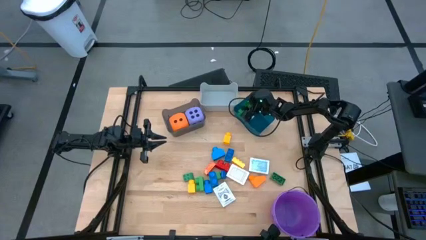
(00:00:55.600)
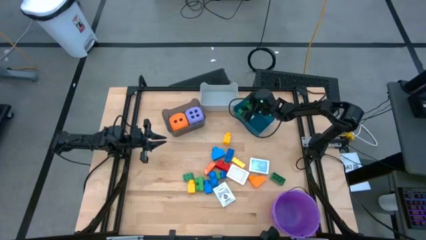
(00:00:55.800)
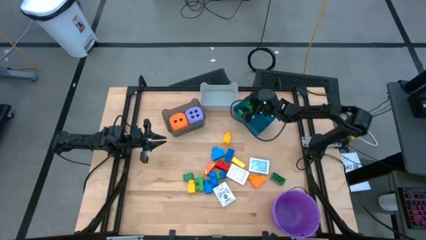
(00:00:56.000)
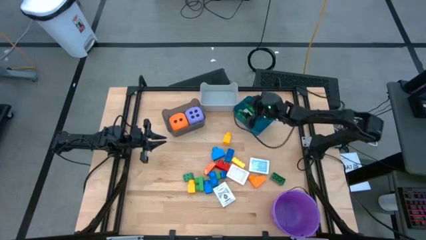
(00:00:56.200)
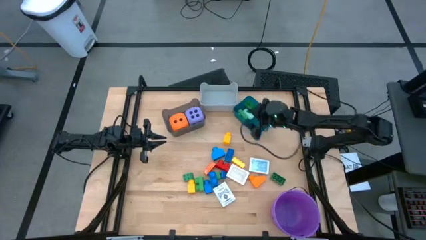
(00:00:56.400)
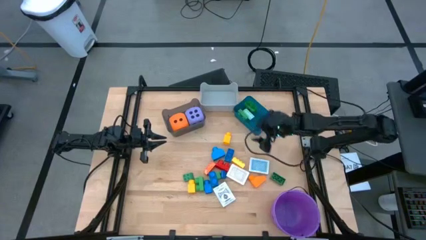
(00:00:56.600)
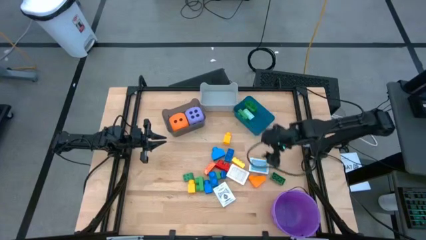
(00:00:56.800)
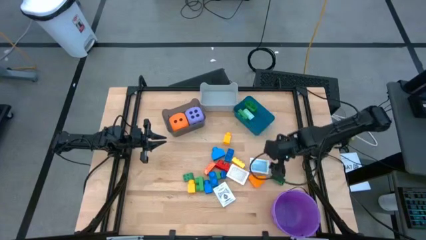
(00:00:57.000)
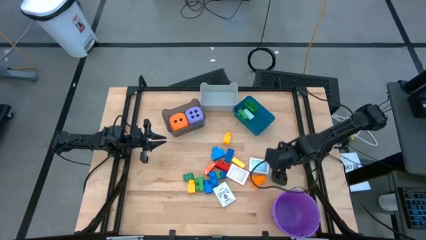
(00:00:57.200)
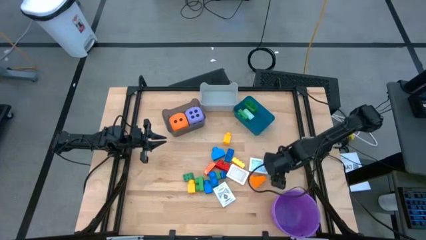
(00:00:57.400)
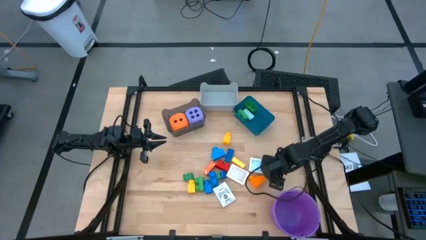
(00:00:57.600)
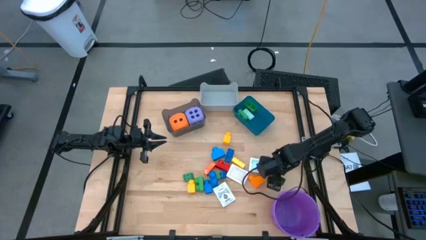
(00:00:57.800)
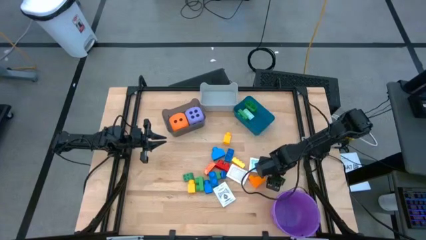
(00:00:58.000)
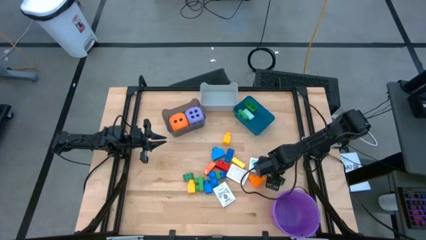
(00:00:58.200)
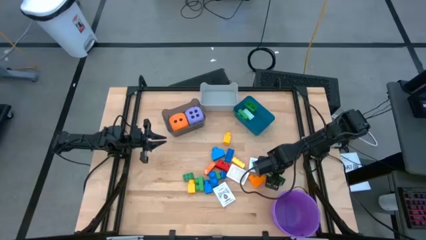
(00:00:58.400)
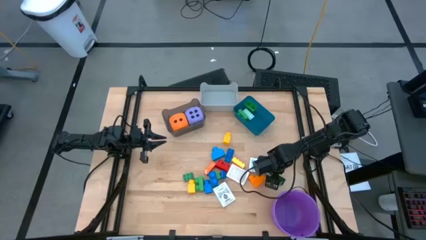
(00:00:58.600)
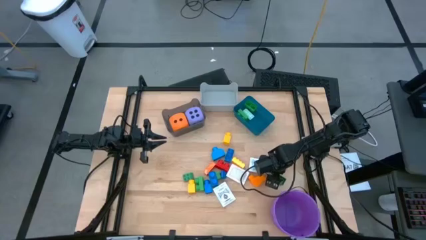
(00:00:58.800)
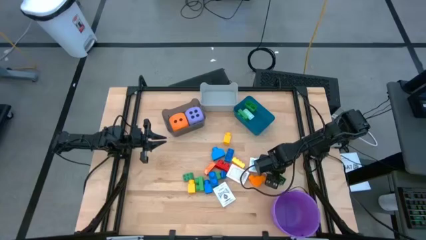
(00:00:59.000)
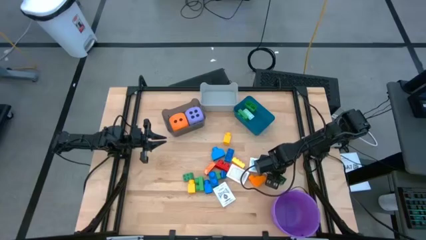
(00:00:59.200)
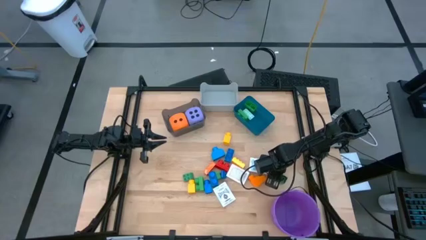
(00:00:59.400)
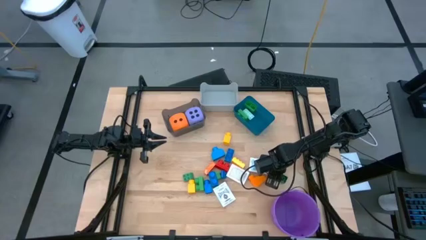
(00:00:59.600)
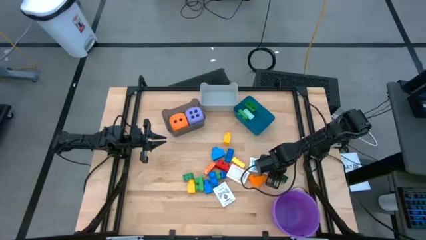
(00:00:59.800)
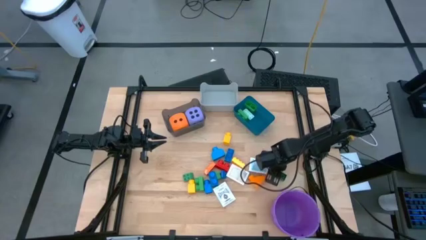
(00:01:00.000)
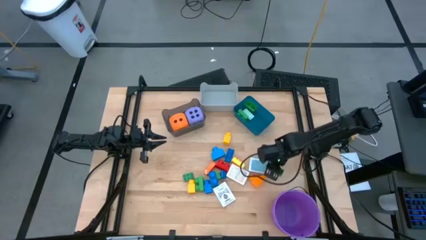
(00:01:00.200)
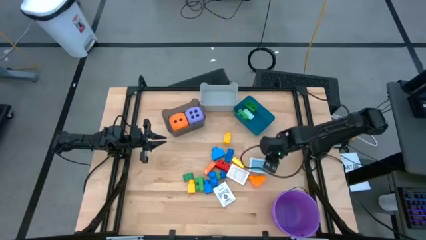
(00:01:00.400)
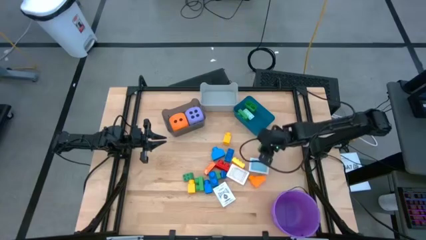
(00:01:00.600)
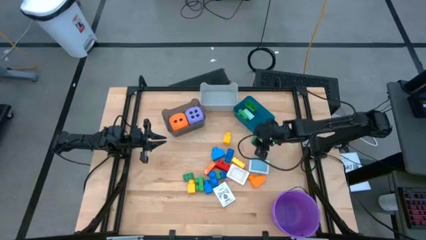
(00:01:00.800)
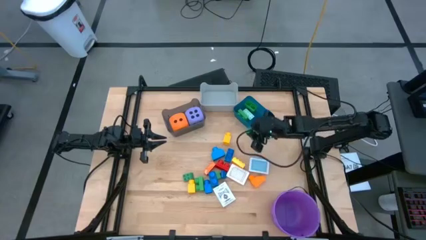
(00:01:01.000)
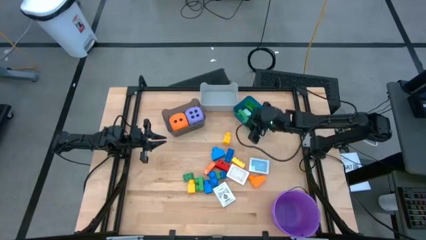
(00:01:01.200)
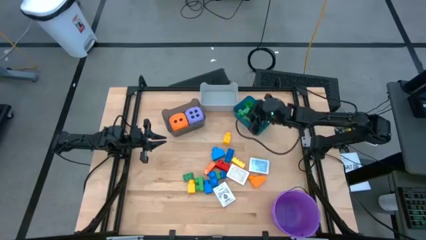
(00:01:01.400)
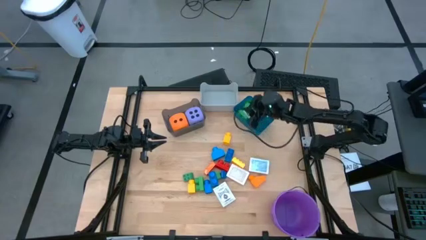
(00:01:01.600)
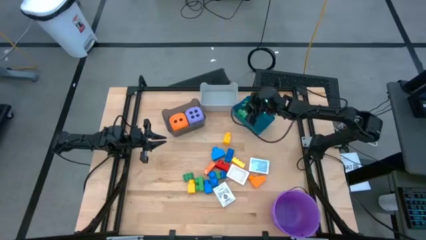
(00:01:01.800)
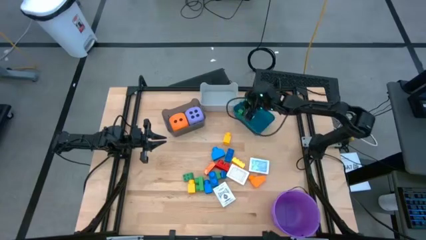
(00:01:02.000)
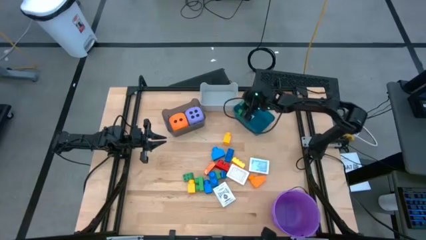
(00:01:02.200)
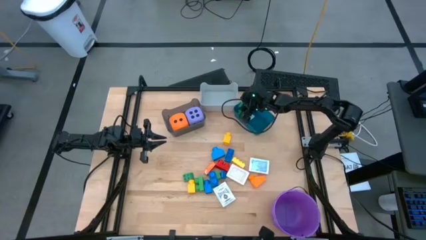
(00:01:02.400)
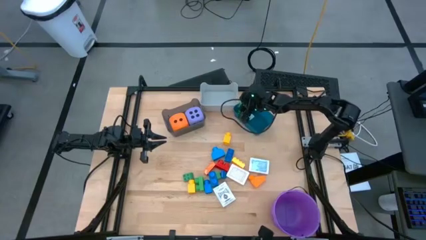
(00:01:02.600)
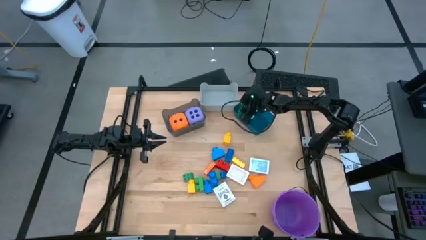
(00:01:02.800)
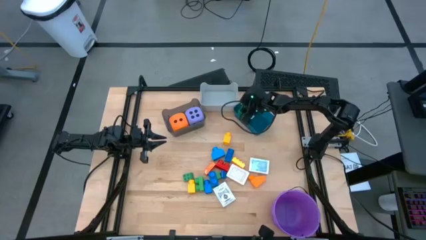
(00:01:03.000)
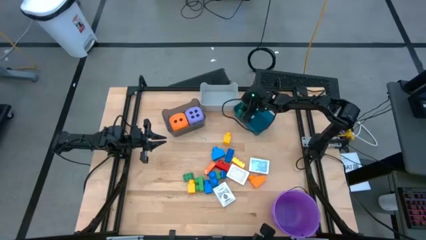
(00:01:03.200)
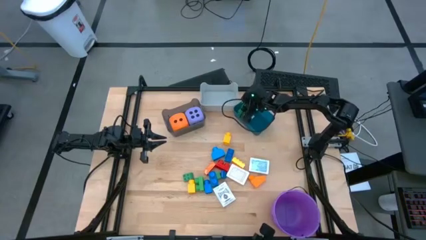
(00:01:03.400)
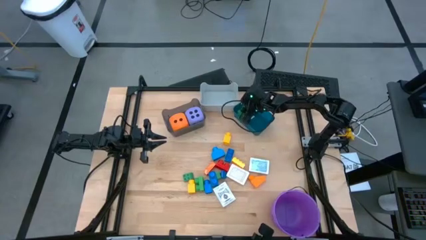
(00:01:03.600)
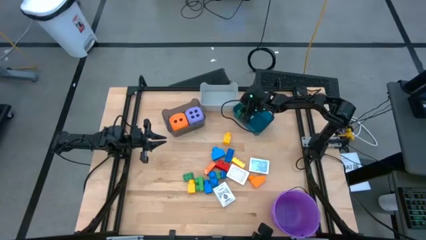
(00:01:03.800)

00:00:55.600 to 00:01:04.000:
Task: Pick & Place Toys
Put the green 8 studs game piece into the blue bin

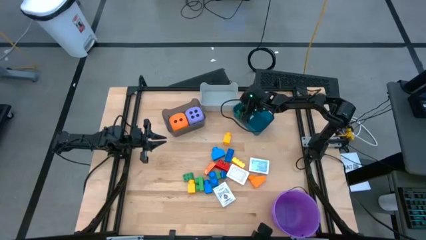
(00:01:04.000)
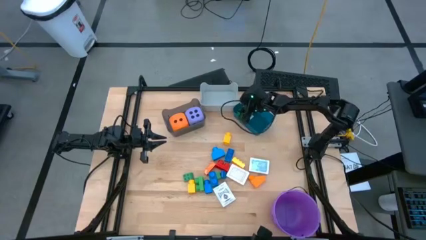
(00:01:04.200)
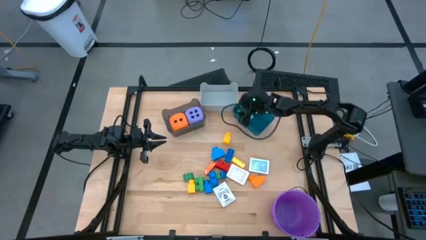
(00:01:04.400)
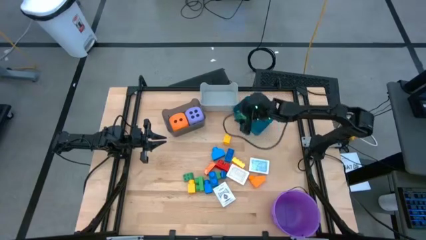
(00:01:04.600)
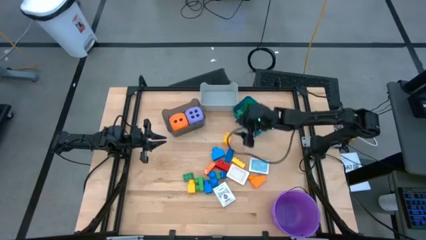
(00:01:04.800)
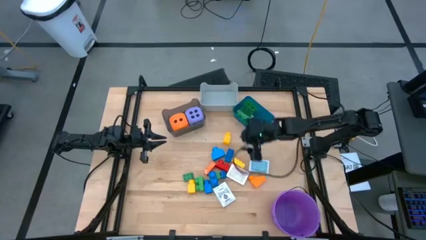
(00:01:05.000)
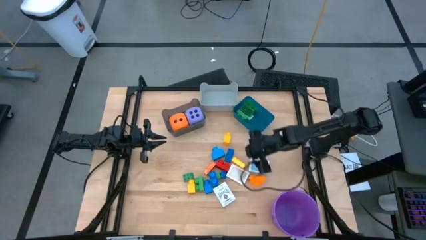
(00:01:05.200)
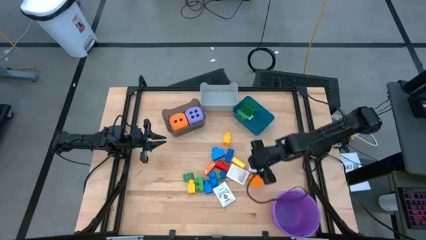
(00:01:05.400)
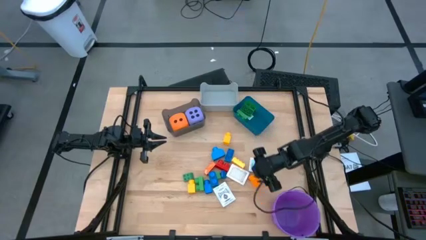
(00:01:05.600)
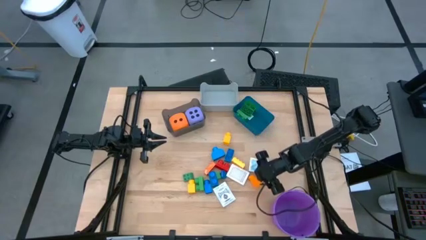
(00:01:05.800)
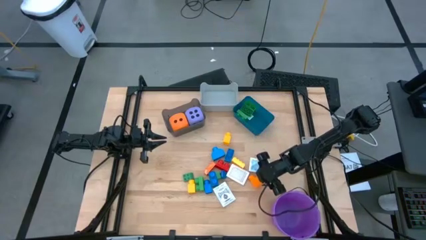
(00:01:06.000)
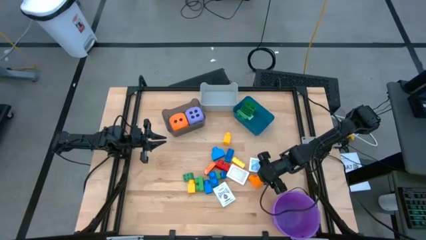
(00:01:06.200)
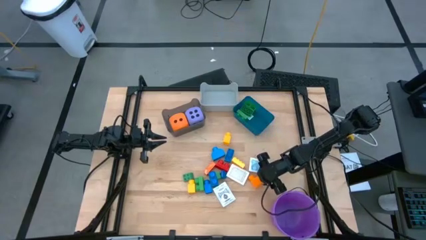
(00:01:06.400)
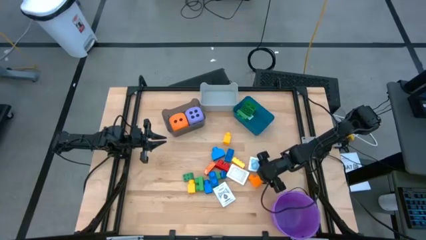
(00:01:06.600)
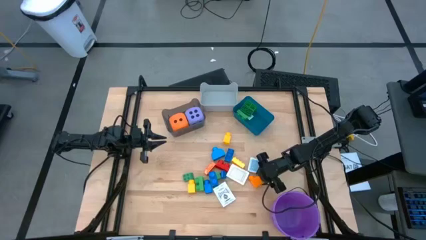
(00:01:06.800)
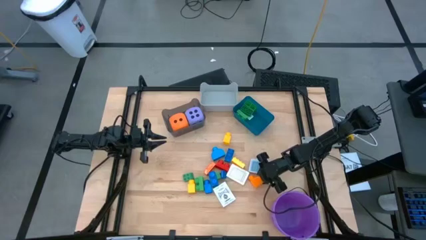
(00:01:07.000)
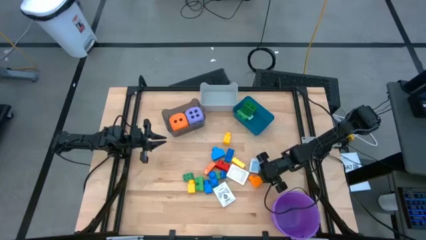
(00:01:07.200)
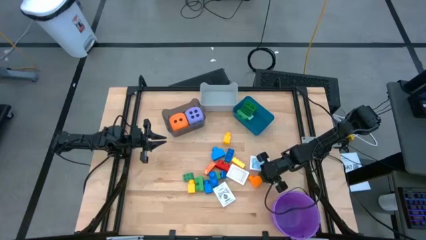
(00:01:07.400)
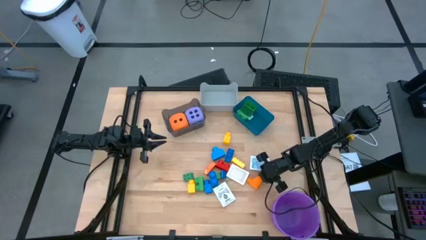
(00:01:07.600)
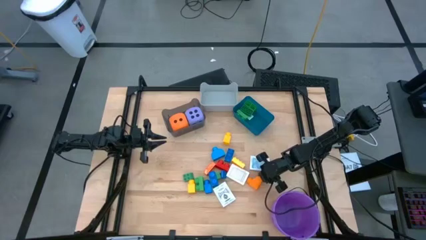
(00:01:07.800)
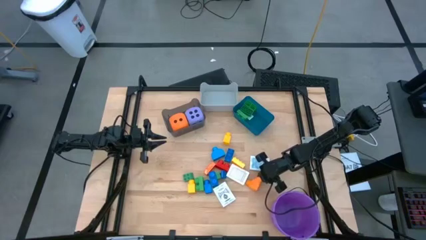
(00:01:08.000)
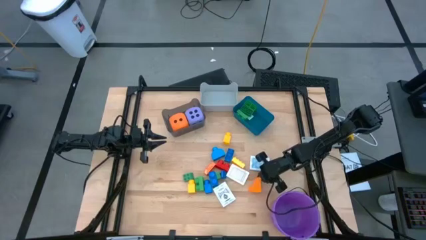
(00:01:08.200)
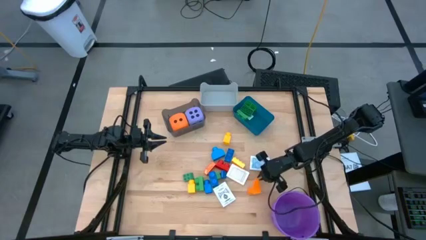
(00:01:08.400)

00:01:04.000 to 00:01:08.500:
Put the orange 1 stud game piece into the blue bin

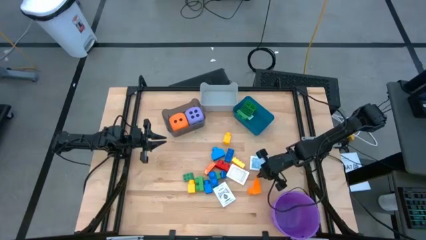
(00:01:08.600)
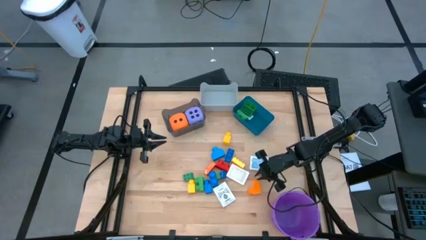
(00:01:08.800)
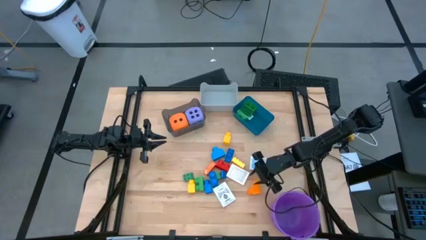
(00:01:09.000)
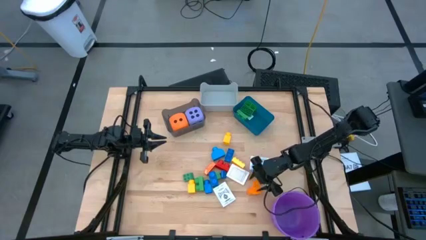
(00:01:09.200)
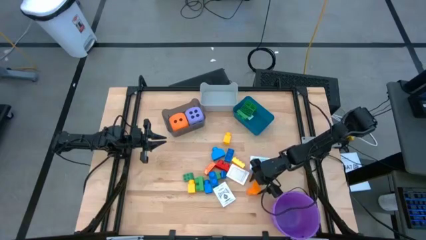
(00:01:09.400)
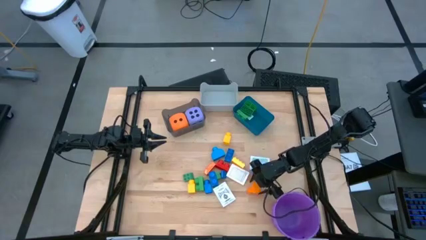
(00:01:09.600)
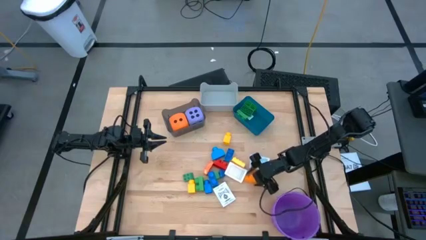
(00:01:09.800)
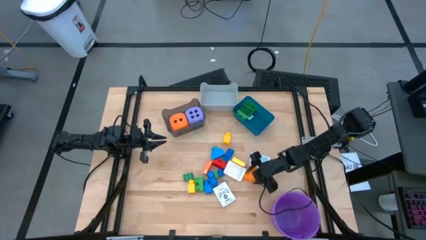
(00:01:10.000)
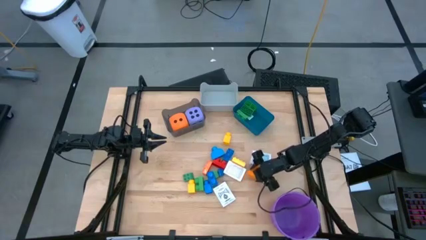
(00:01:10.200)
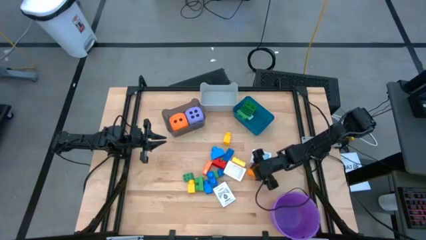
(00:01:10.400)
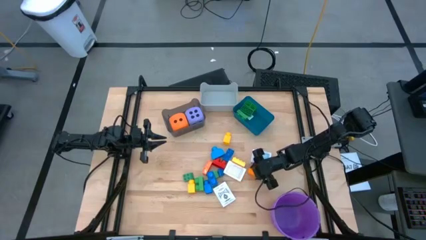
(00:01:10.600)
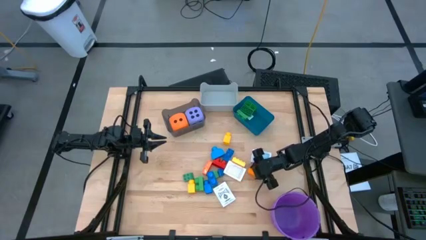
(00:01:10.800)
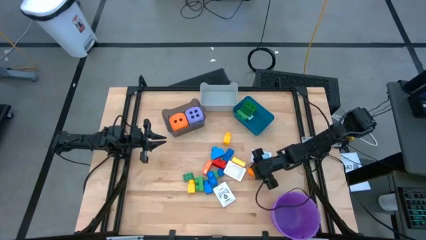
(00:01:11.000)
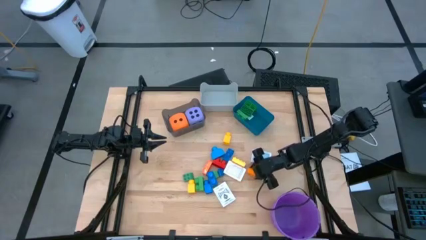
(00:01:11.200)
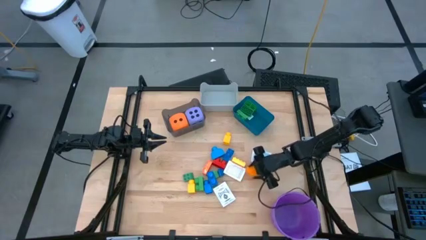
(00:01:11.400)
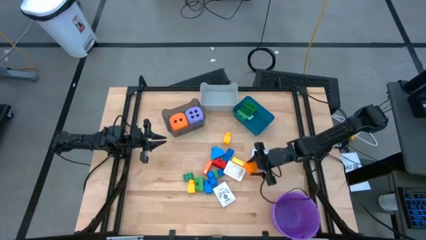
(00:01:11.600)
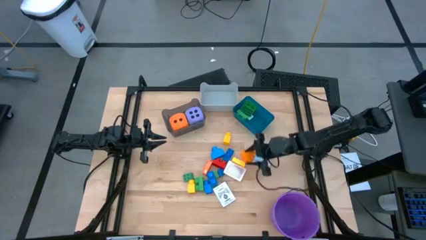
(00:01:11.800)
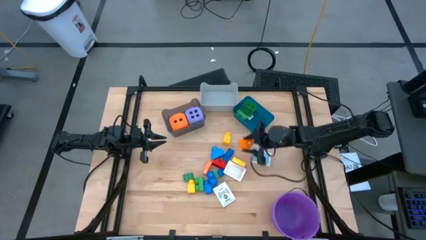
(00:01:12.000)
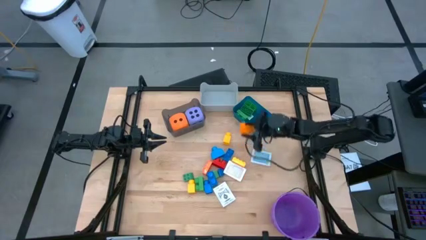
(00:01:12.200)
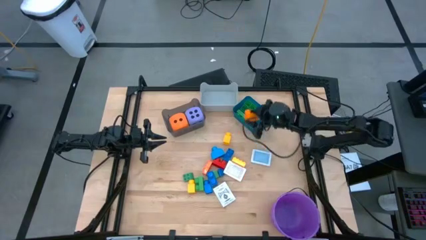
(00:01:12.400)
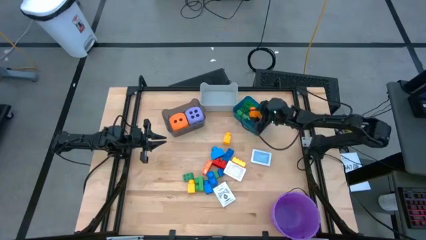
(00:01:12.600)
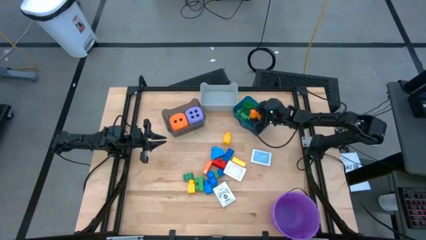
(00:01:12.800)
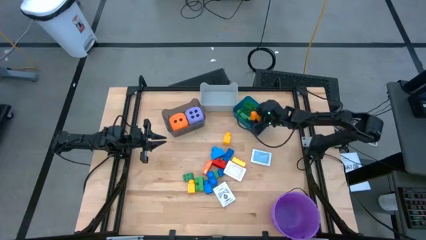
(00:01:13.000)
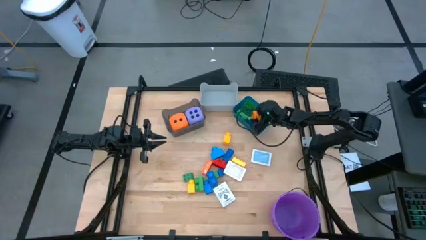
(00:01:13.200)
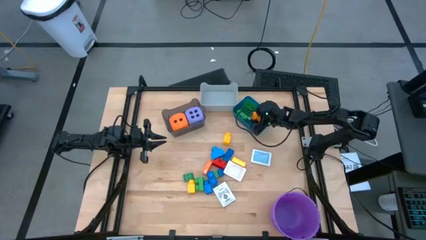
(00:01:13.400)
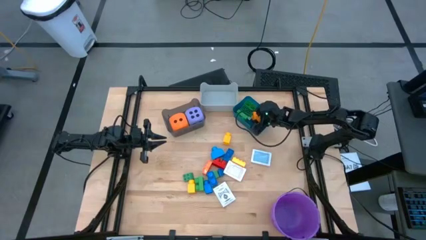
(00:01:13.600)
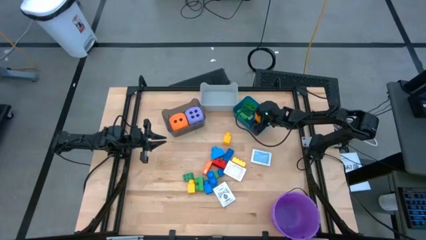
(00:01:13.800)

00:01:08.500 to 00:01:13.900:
Put the orange 1 stud game piece into the blue bin
